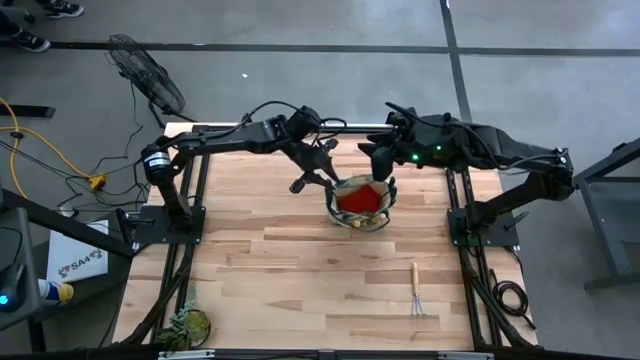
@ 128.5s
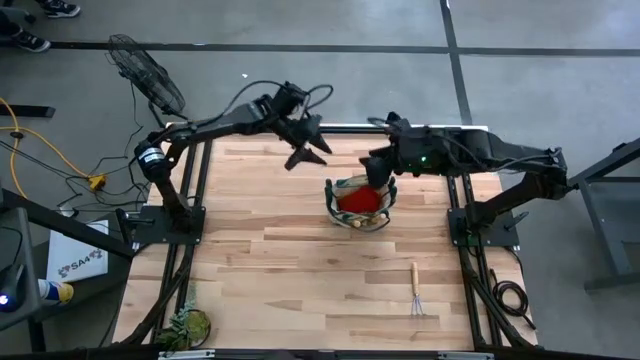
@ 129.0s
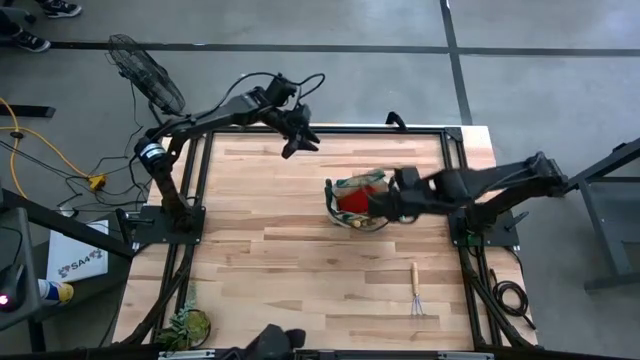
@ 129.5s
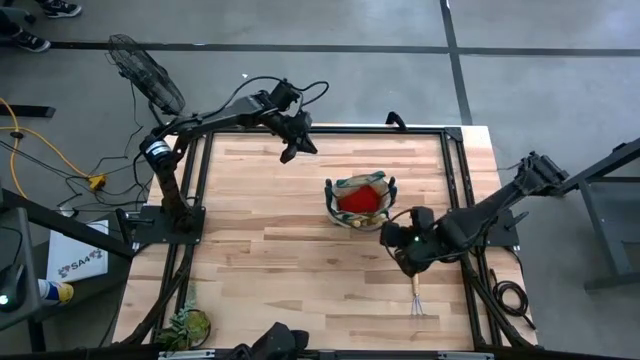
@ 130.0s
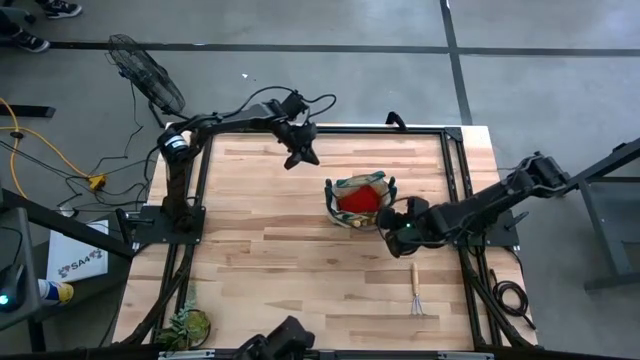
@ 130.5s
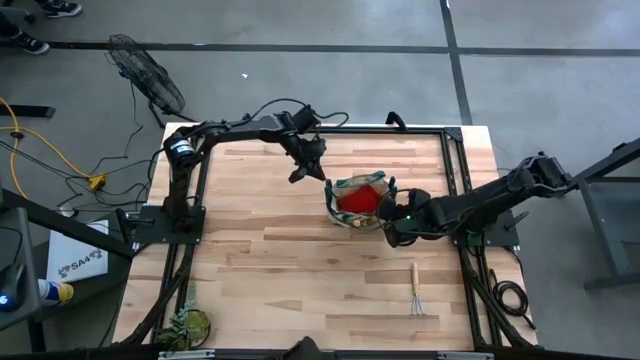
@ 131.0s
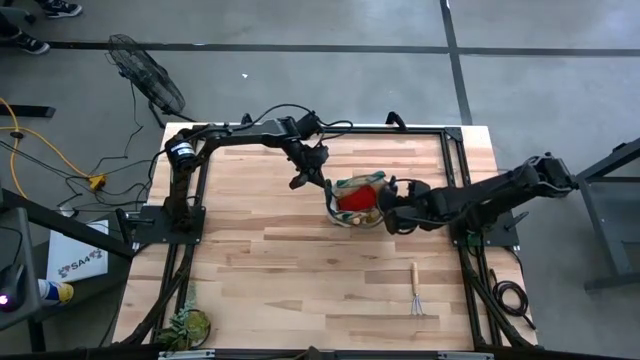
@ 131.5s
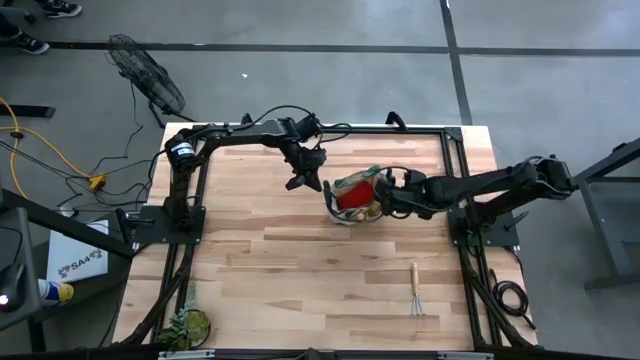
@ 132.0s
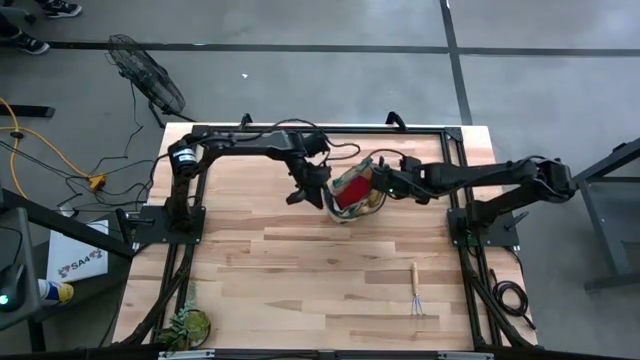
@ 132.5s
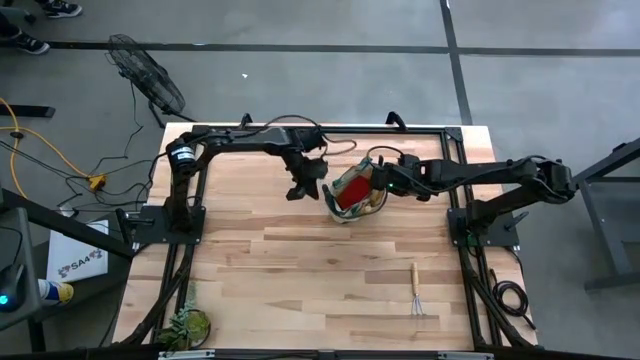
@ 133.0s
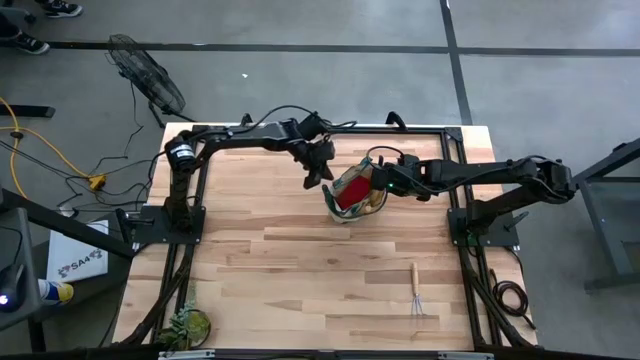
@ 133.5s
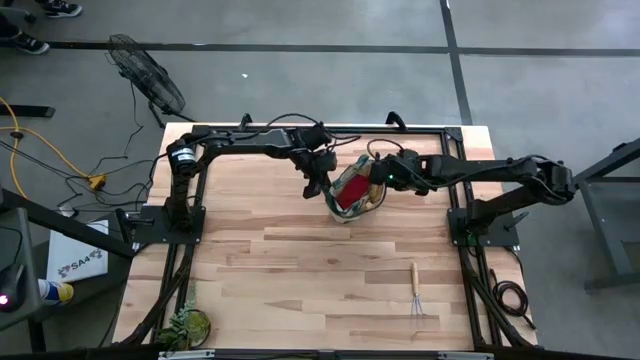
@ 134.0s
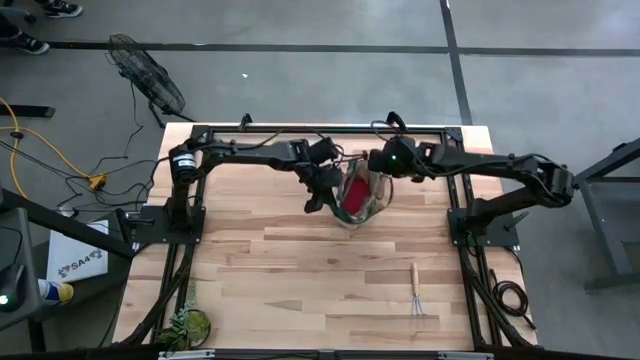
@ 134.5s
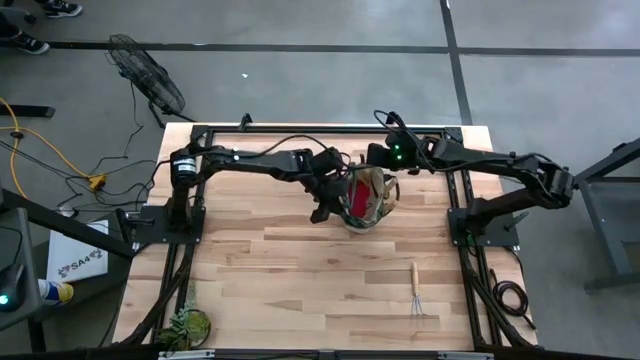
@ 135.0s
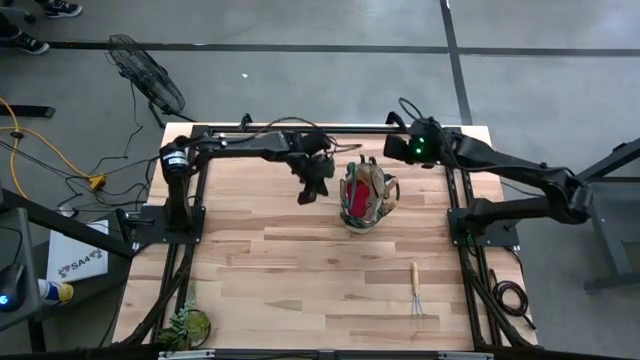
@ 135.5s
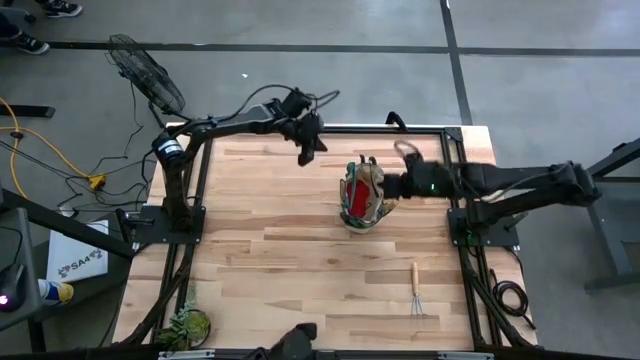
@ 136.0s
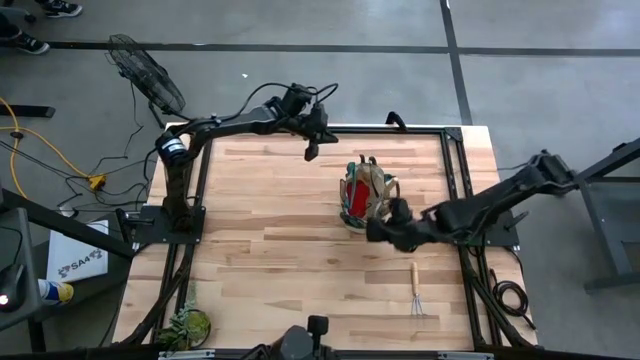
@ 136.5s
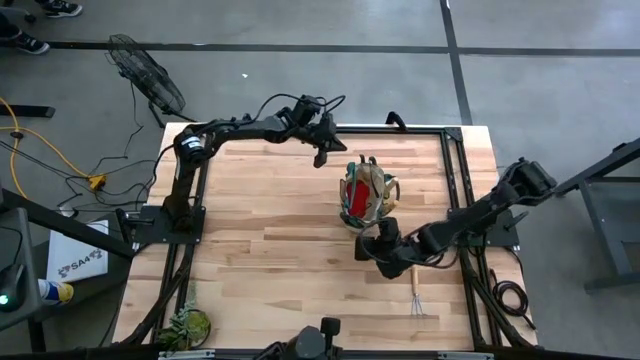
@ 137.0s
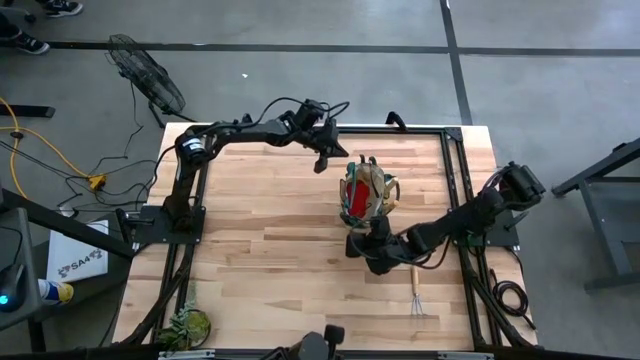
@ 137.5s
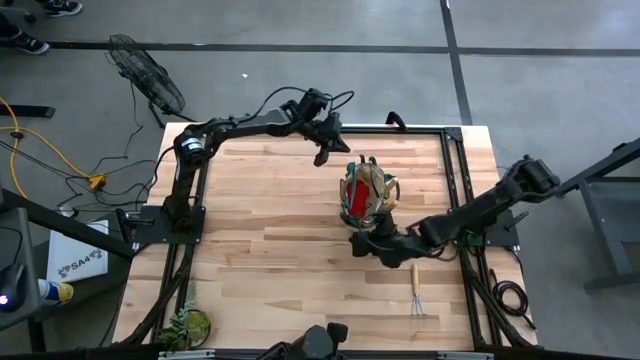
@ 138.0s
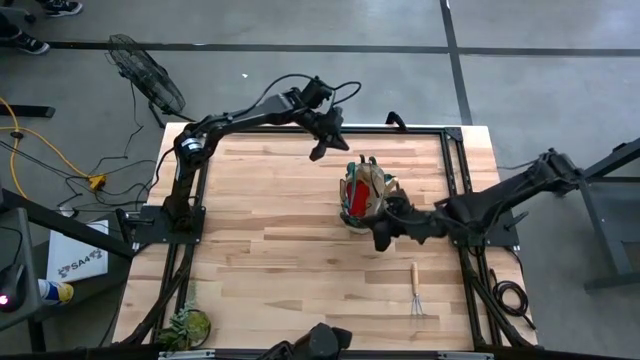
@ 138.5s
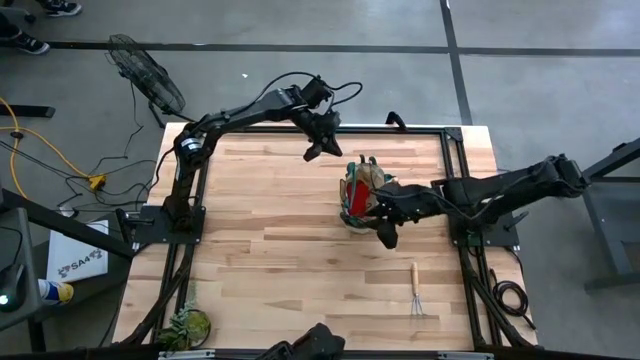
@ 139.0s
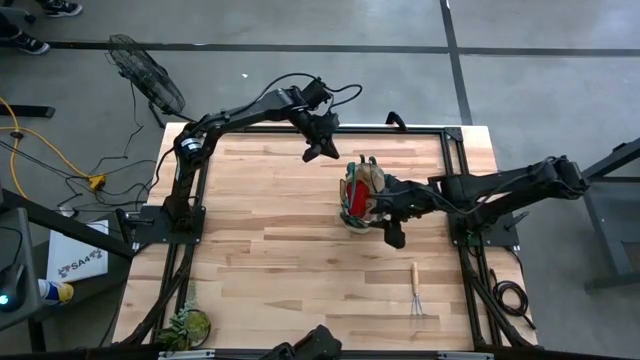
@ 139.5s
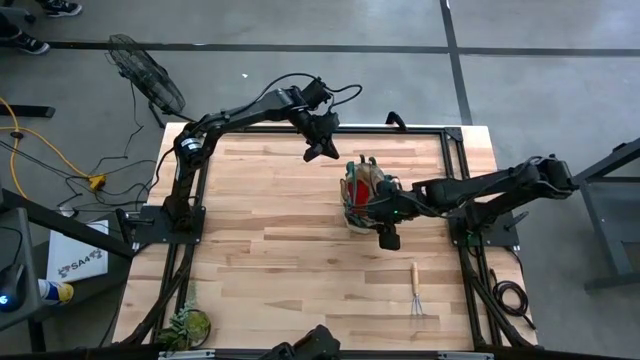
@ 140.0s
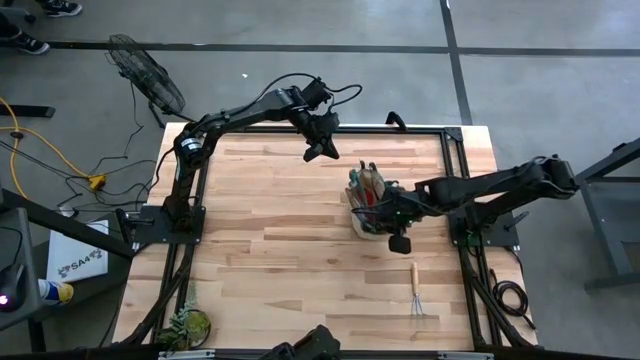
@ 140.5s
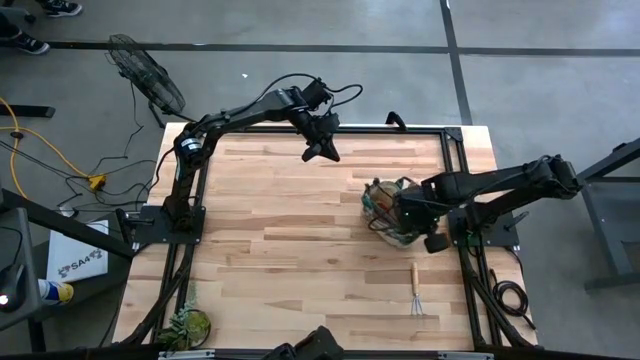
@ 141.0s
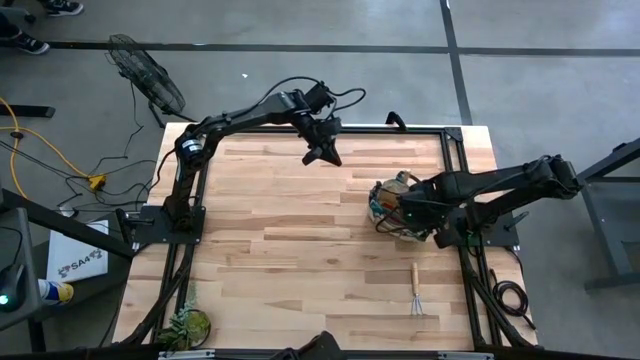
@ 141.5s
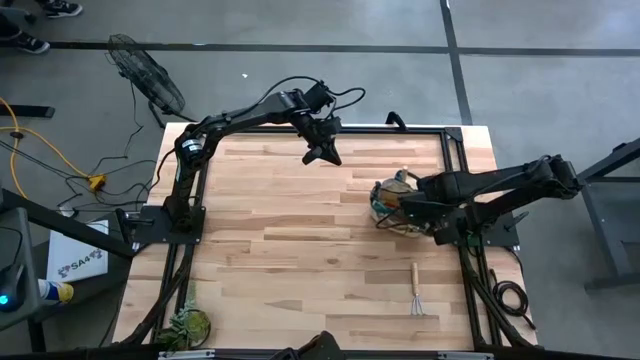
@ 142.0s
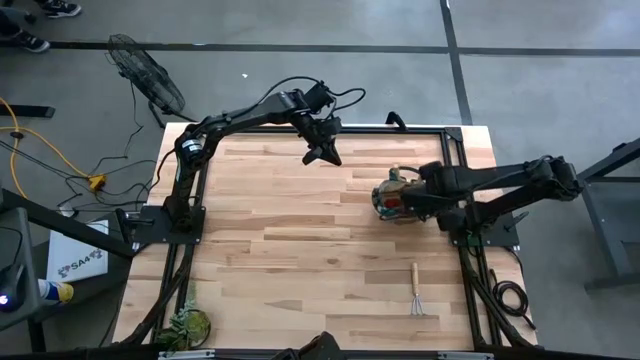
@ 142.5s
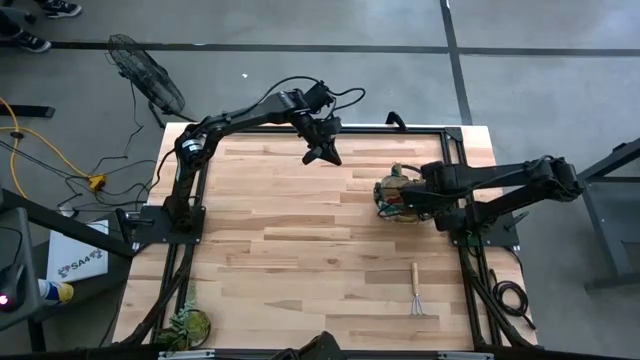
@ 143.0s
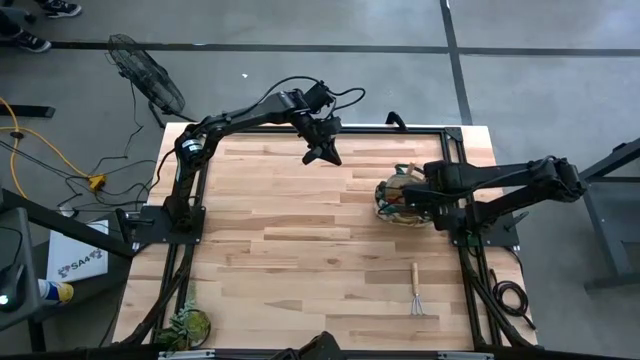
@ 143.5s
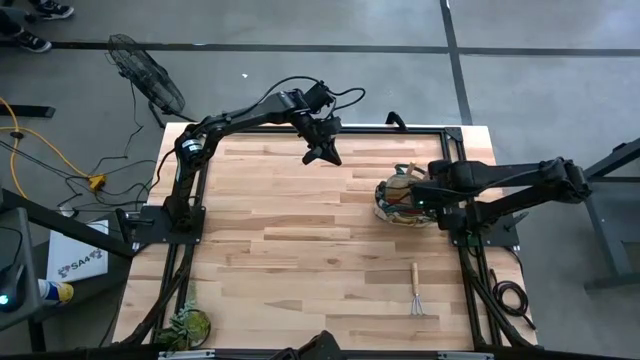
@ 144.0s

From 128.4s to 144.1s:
Task: Pick & Place Garden tools in Gardening bag
Adjust the gardening bag

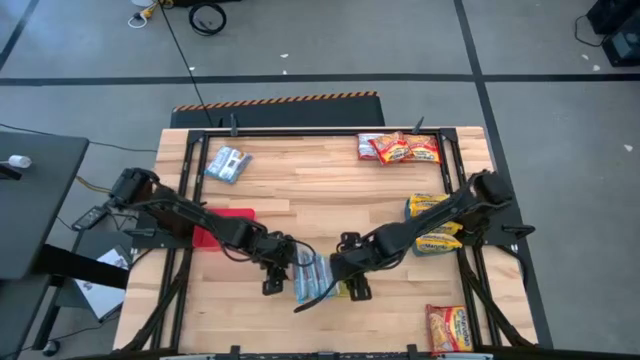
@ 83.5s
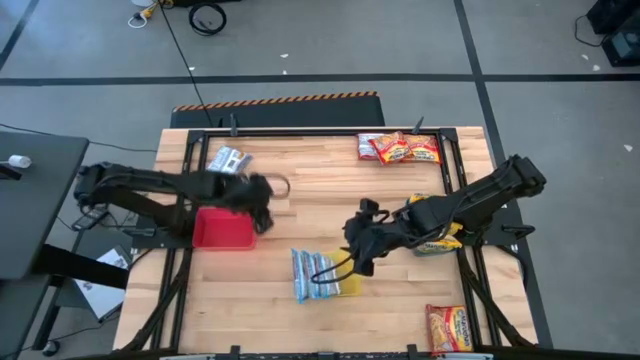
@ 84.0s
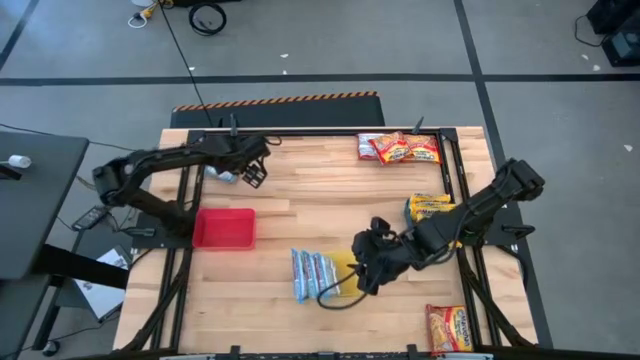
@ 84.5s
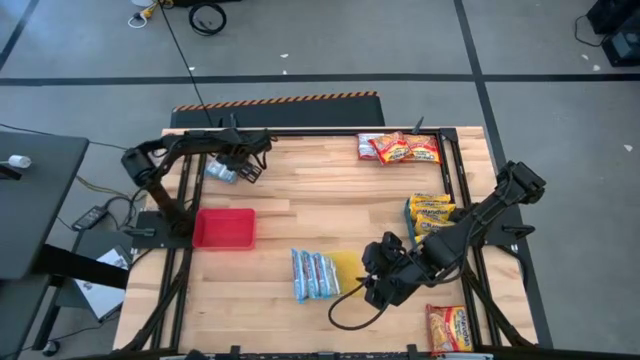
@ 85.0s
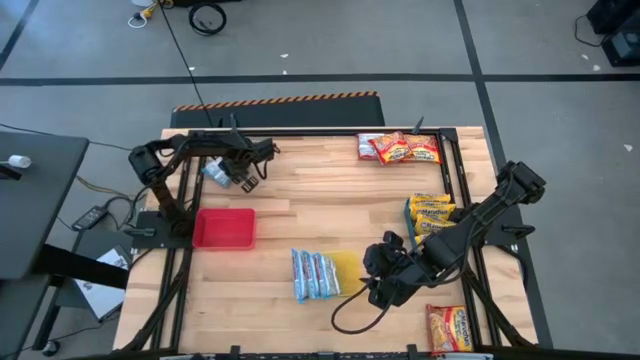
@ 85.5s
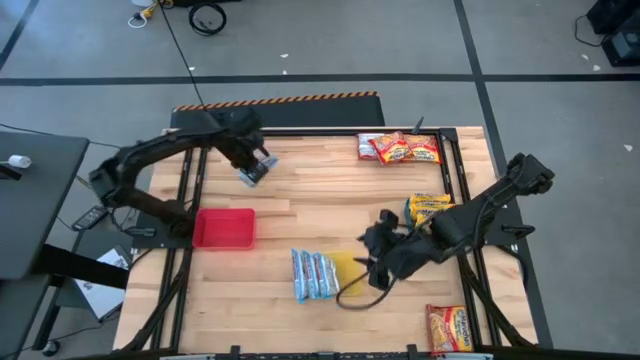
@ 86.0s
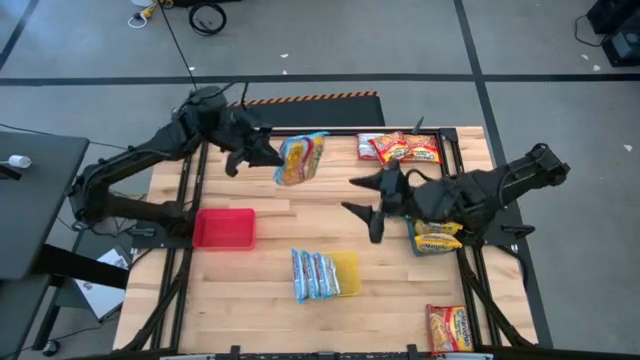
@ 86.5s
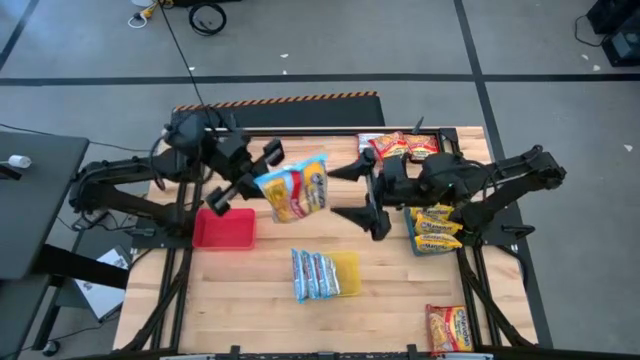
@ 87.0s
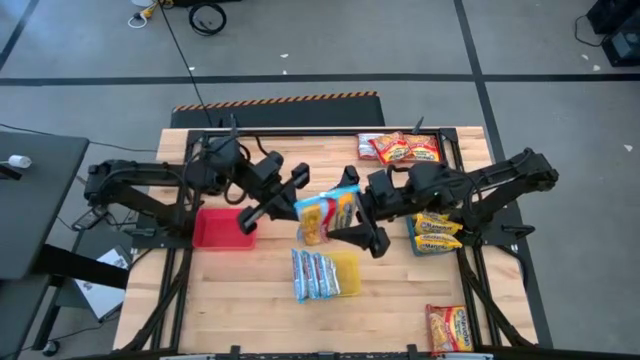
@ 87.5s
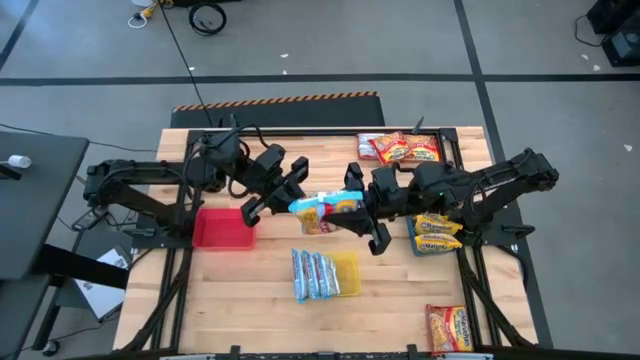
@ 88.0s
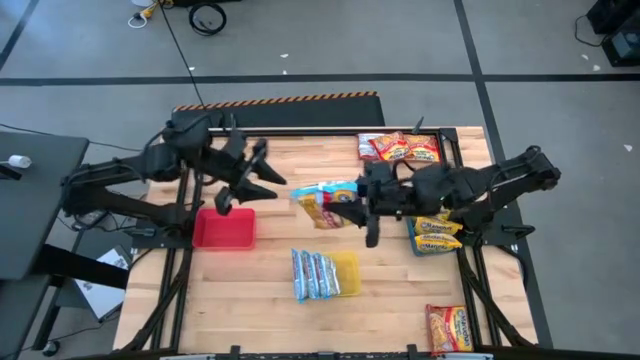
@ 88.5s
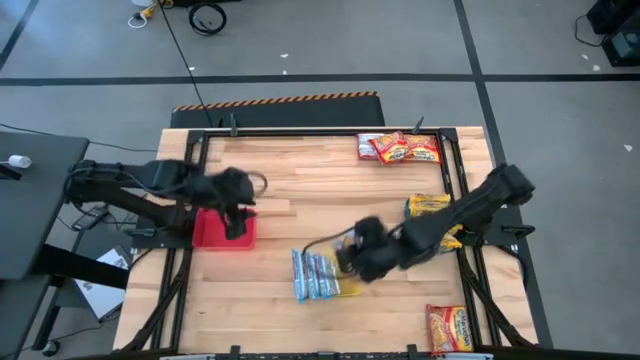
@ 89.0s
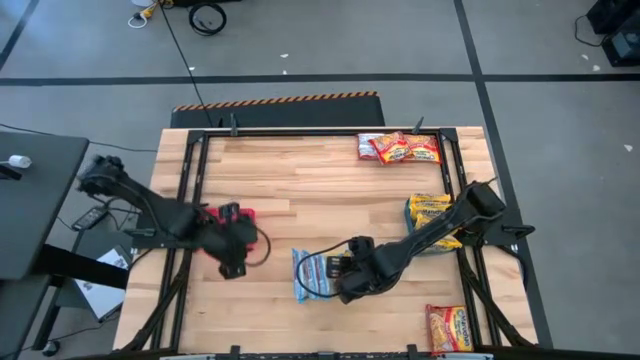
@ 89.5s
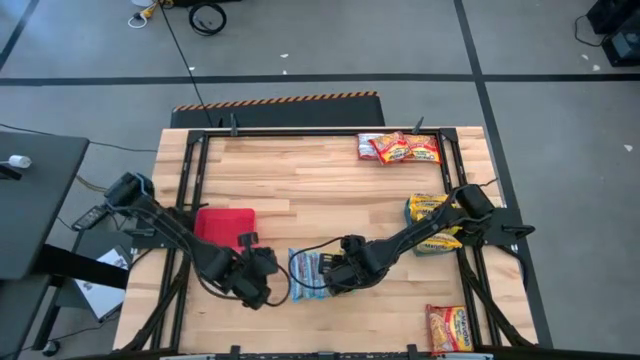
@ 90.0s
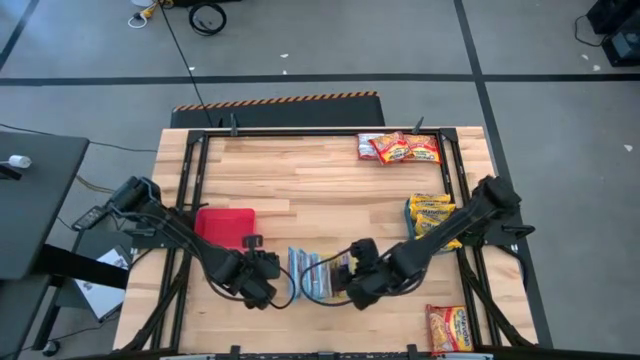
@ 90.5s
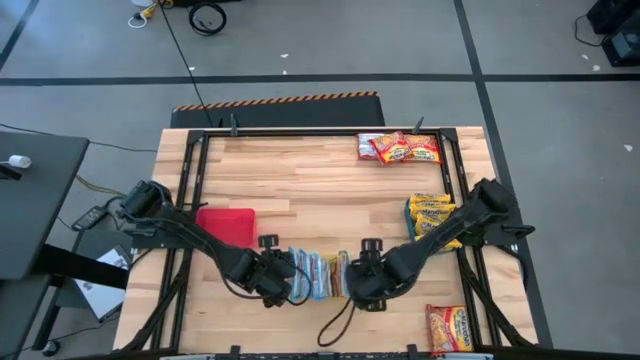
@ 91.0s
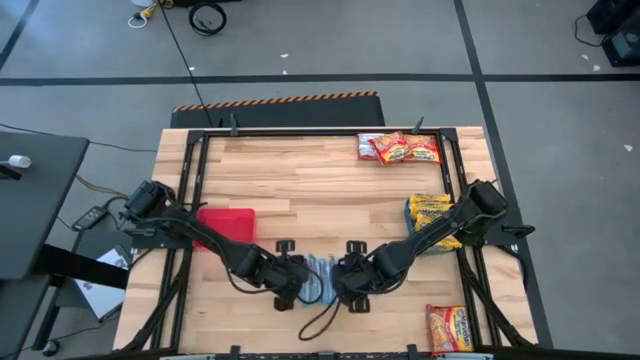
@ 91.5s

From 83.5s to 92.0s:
Task: Sort Maruchan noodles
Put the light blue noodle pack into the yellow bin
